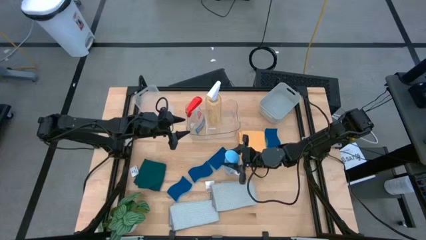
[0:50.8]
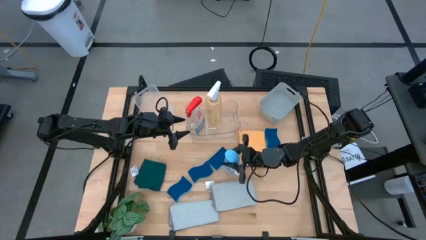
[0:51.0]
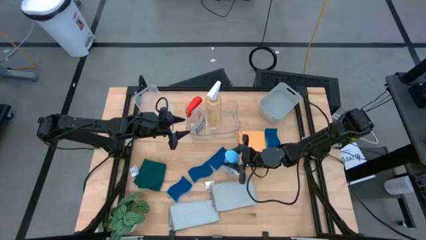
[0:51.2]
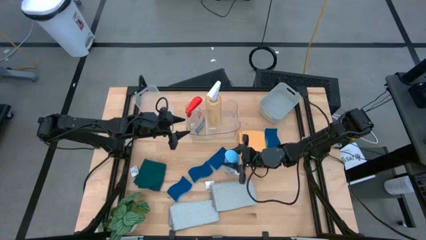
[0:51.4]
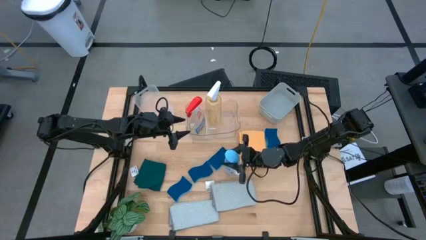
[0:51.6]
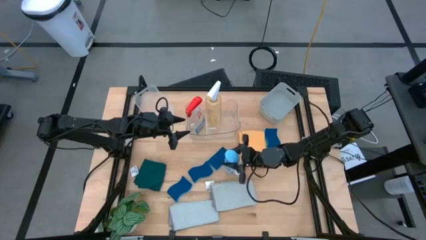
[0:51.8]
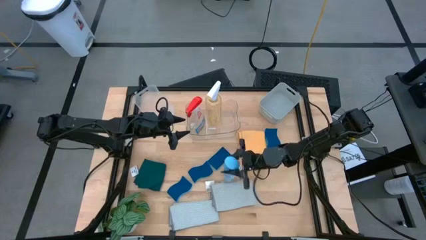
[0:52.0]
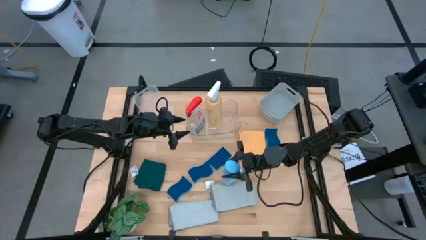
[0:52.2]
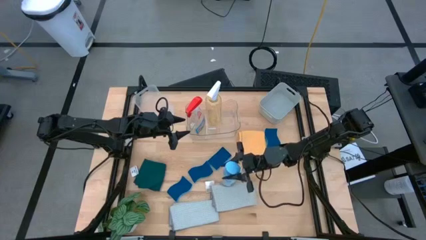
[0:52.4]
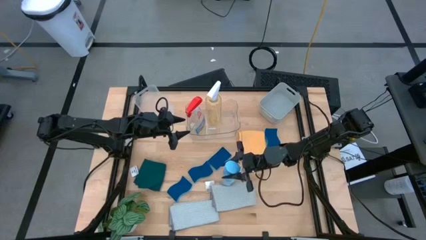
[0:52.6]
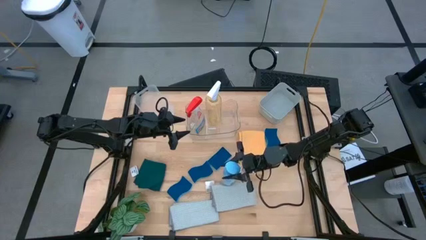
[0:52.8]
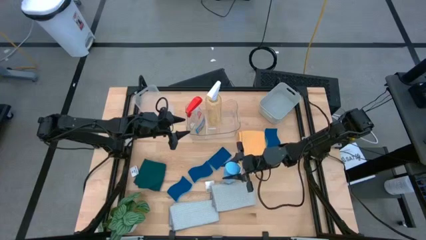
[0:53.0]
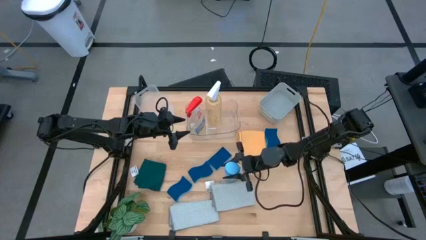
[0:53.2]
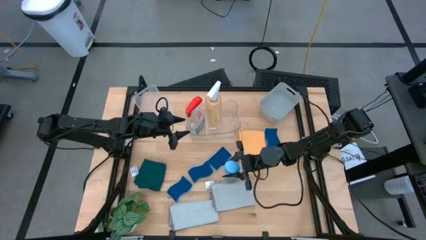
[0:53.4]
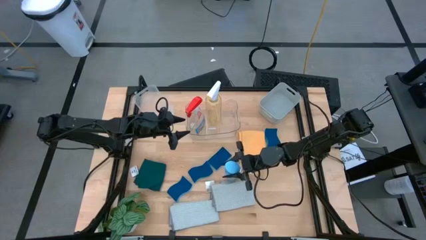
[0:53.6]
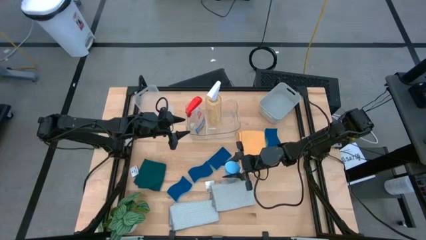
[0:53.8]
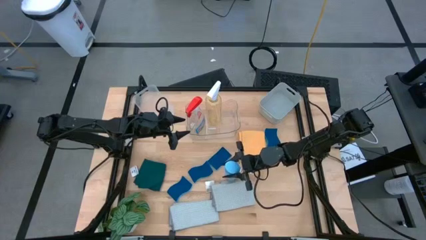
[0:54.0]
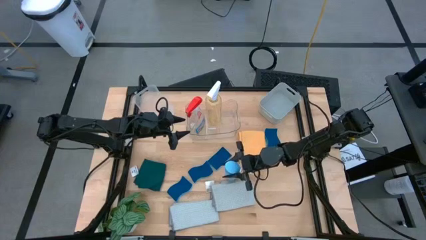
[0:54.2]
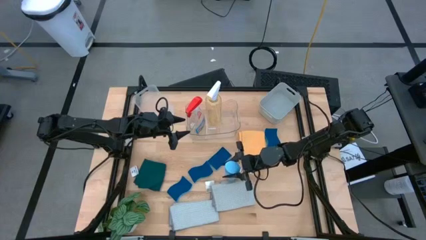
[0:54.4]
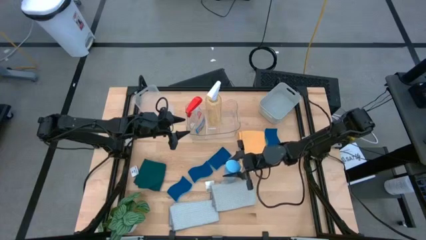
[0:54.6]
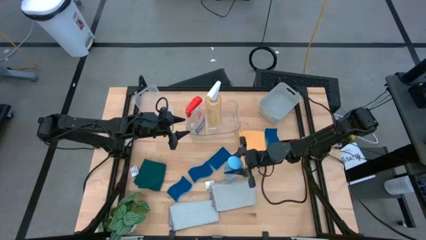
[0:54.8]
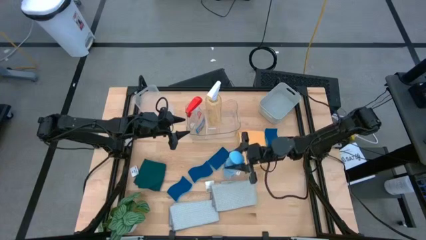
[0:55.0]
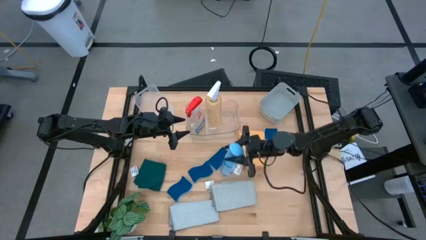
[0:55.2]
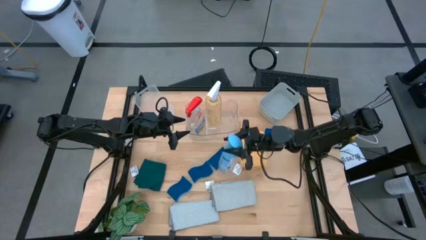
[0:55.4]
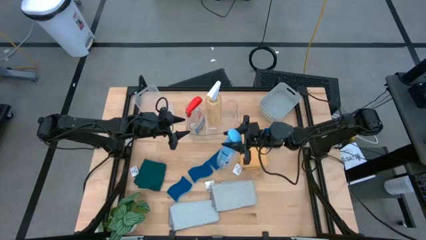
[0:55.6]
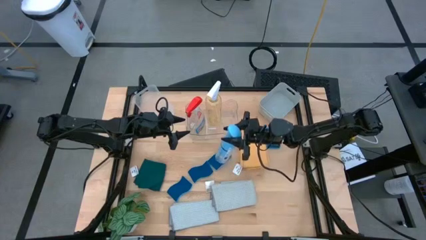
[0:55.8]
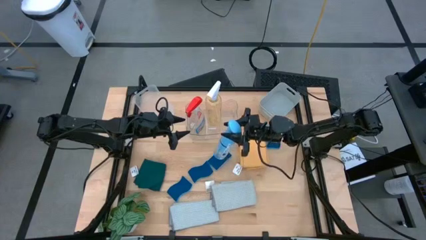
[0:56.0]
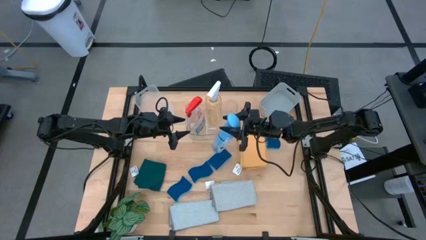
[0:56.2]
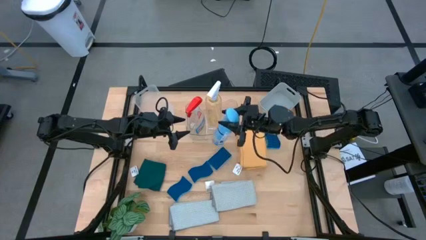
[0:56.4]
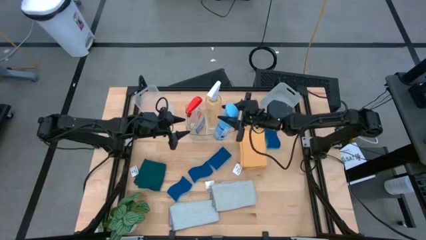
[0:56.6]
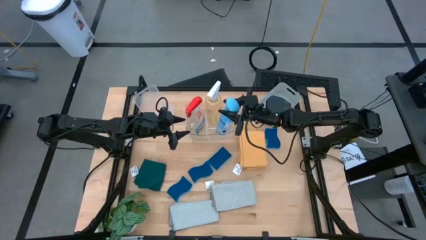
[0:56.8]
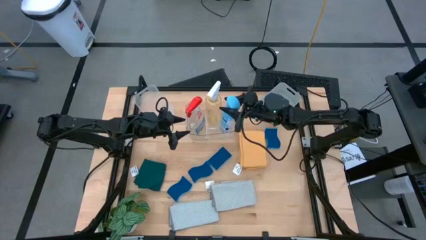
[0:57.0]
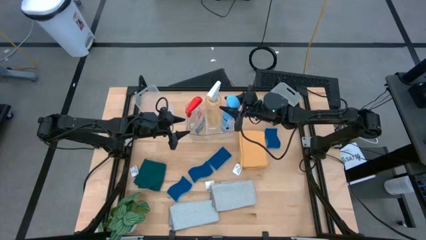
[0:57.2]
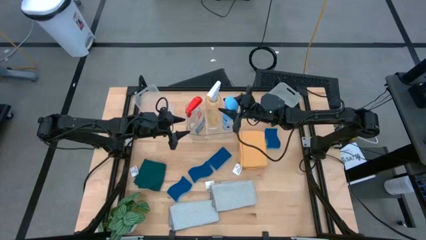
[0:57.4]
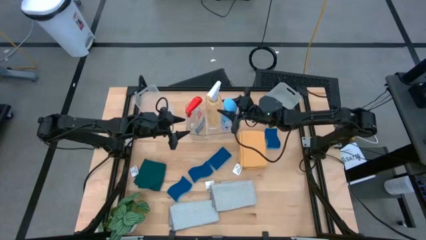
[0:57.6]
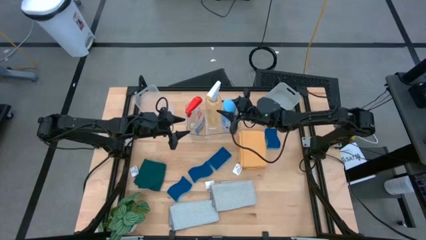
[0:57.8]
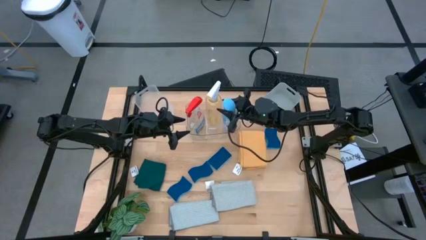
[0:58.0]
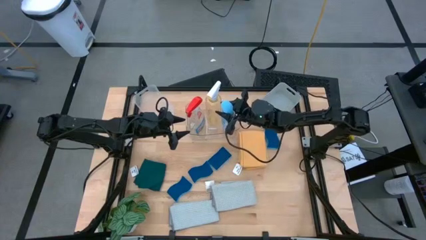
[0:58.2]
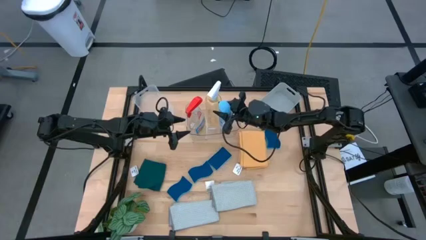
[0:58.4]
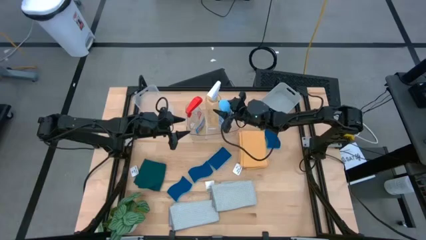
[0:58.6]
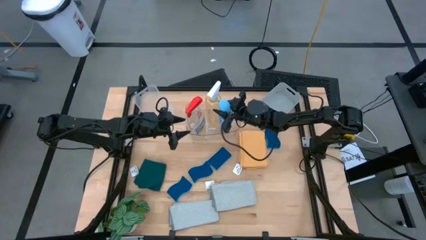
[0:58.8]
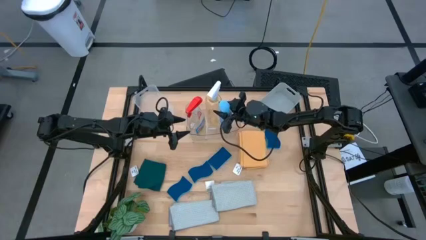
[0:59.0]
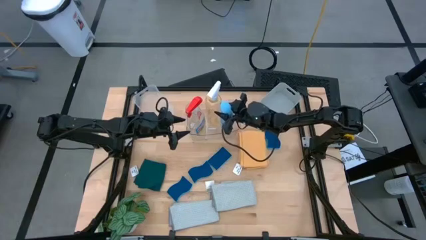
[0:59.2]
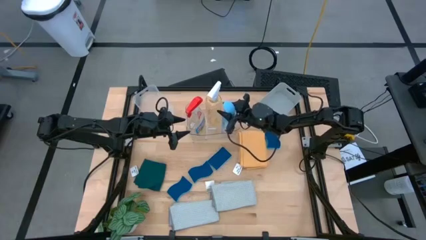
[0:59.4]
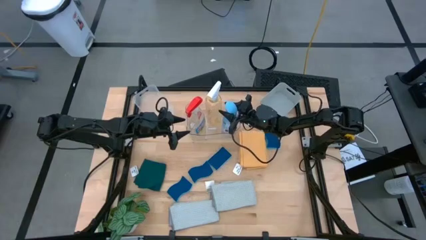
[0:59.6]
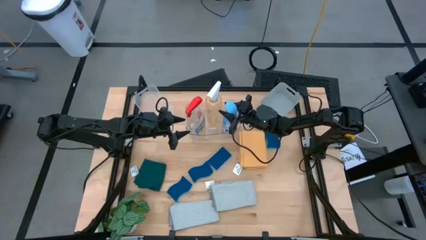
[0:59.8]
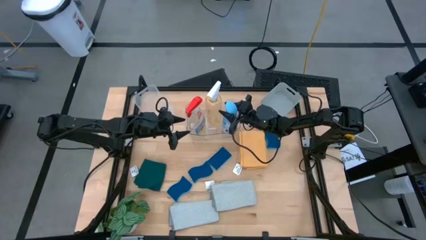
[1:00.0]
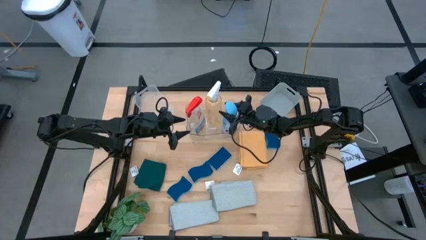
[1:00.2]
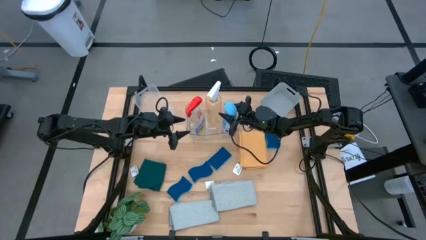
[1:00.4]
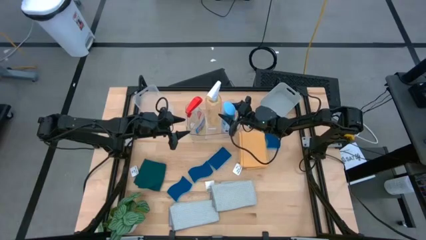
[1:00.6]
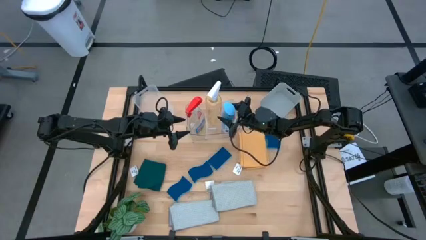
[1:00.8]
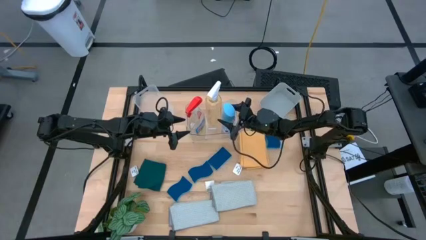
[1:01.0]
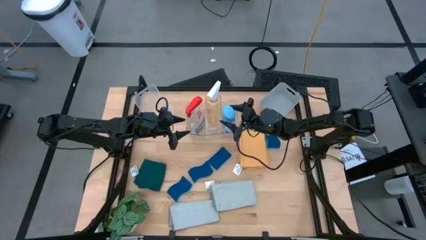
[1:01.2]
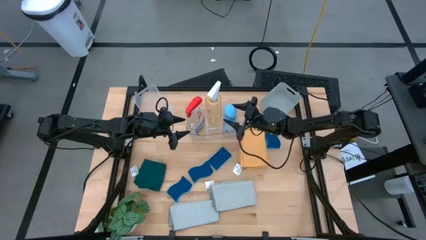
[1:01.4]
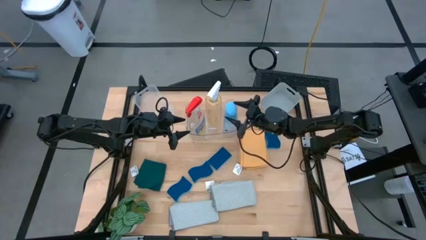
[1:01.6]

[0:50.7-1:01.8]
Task: Pick & Place Kitchen Items
Put the blue air freshener spray into the transparent bin
